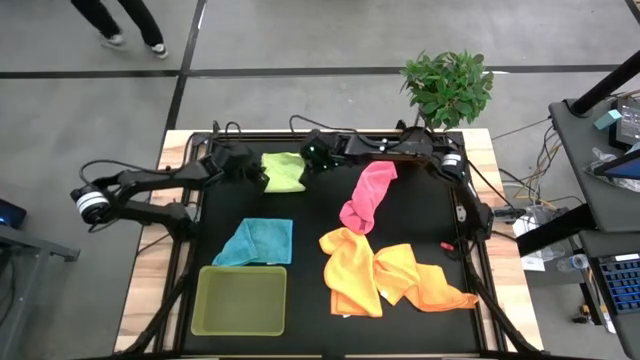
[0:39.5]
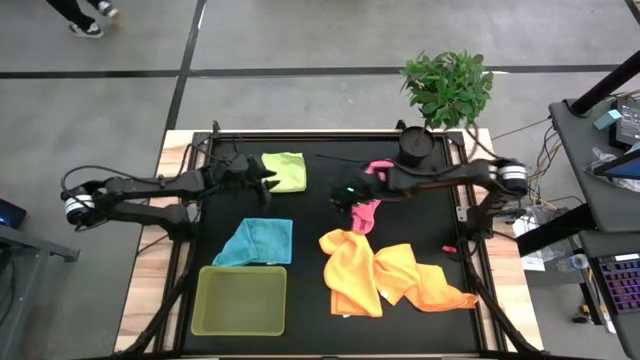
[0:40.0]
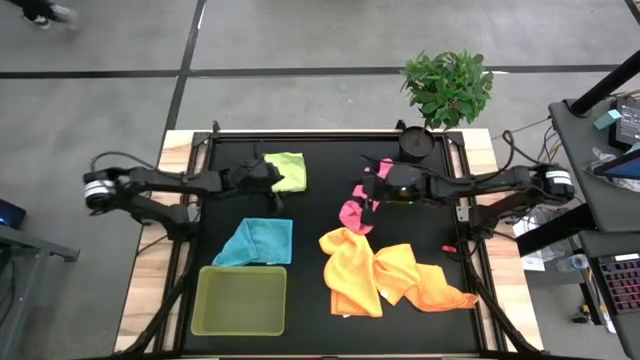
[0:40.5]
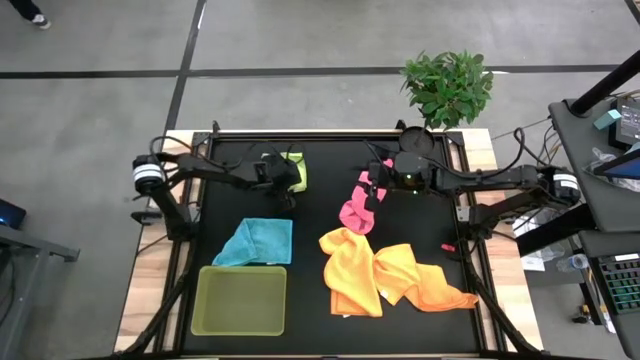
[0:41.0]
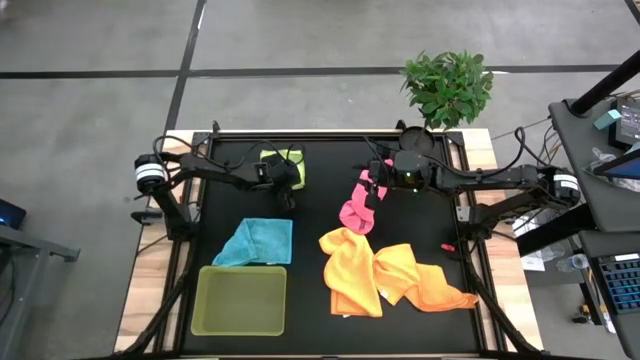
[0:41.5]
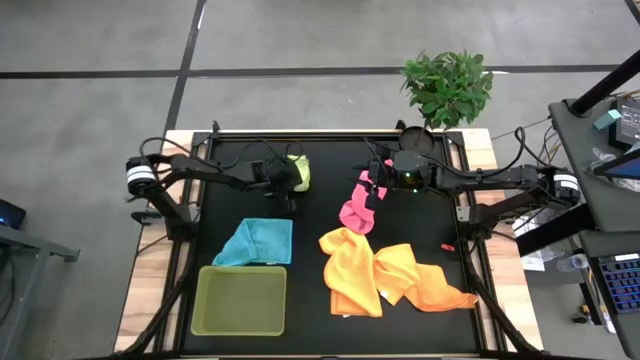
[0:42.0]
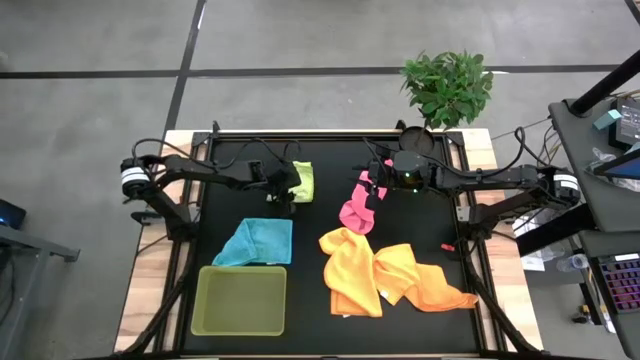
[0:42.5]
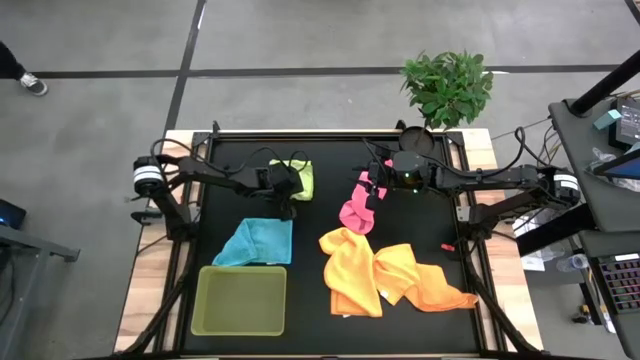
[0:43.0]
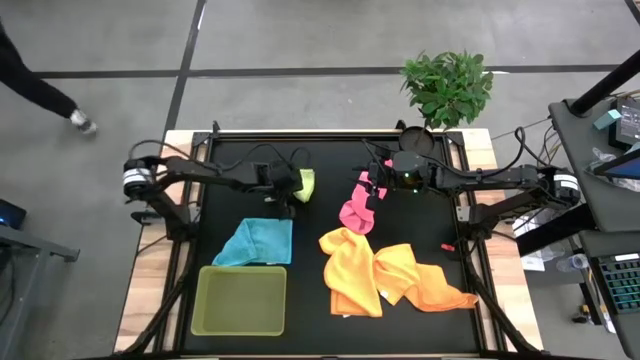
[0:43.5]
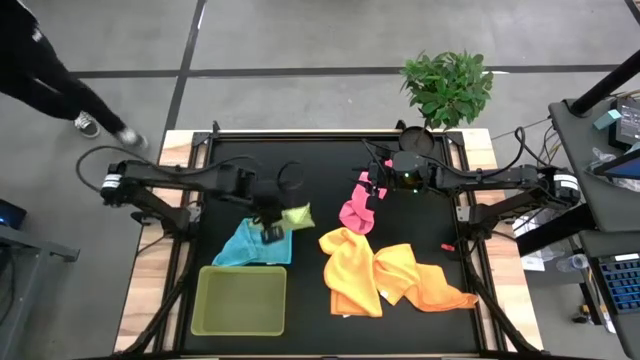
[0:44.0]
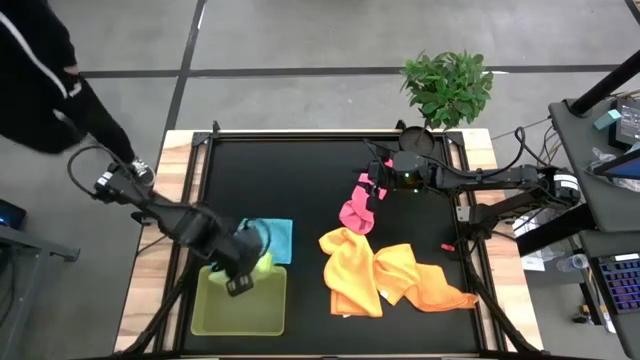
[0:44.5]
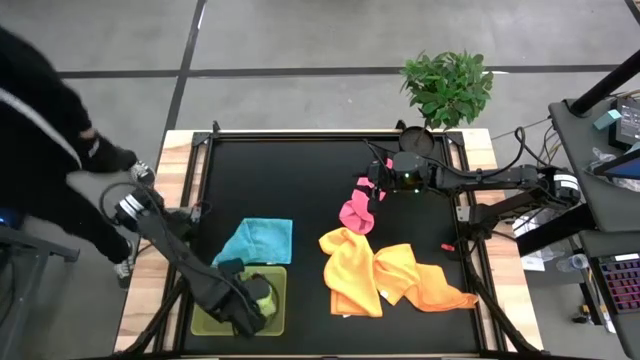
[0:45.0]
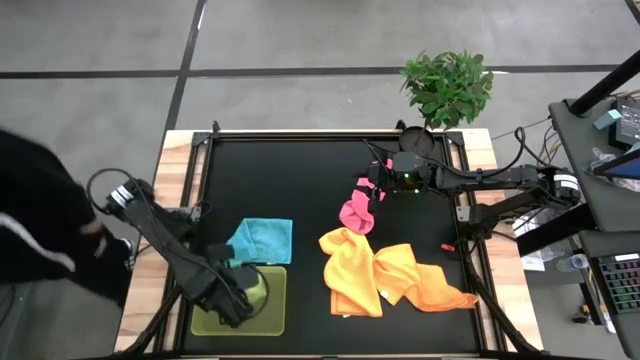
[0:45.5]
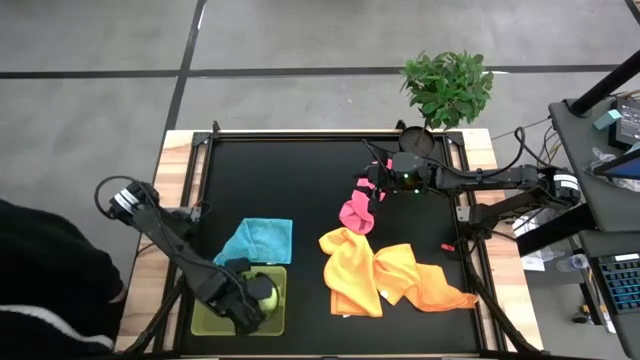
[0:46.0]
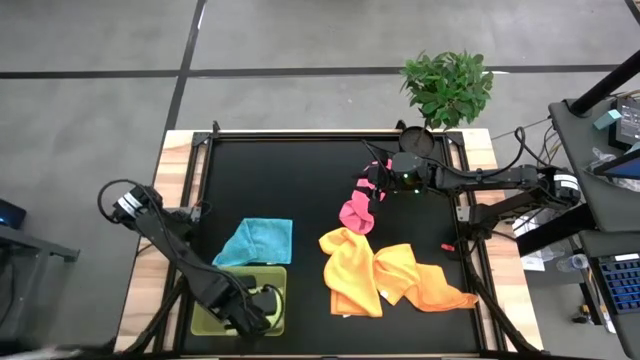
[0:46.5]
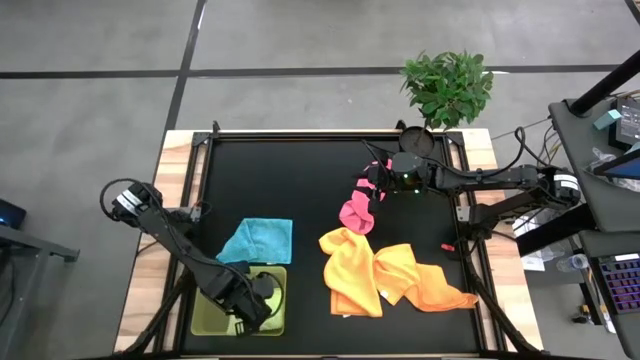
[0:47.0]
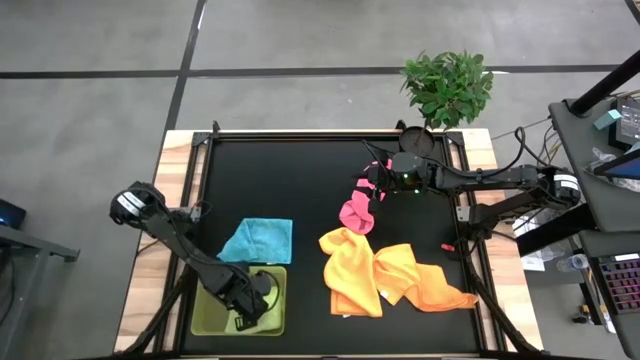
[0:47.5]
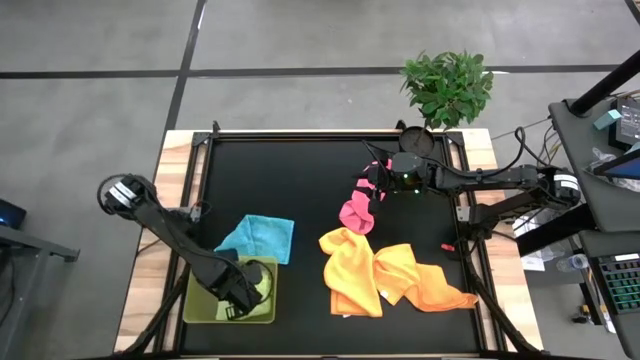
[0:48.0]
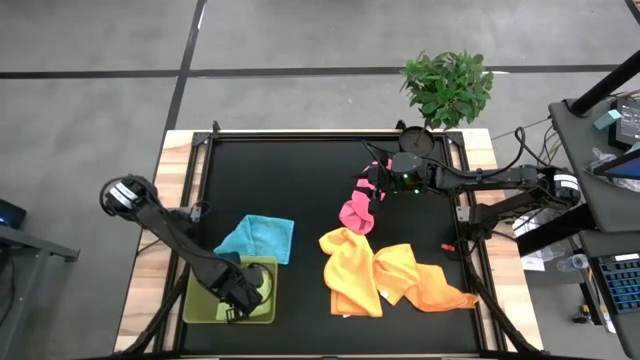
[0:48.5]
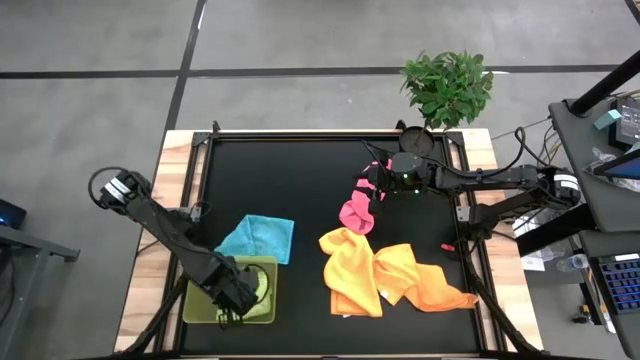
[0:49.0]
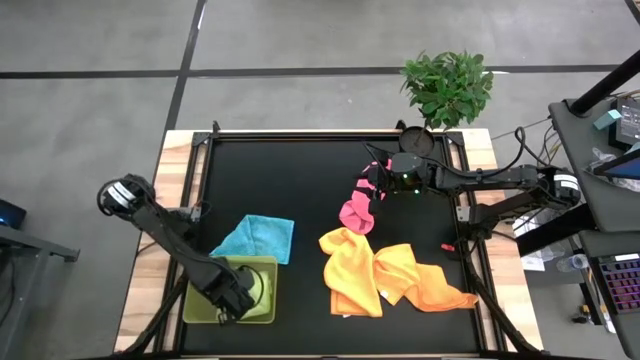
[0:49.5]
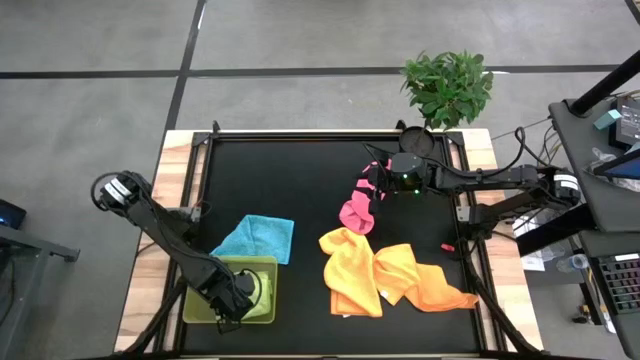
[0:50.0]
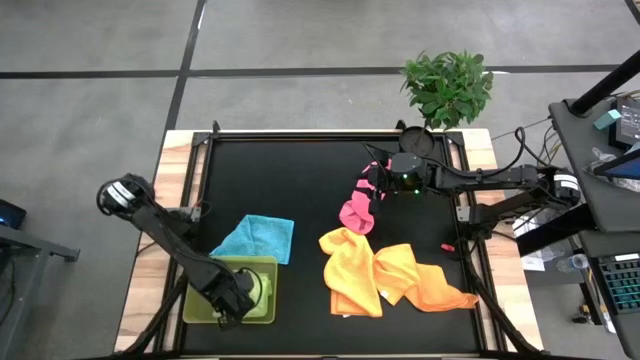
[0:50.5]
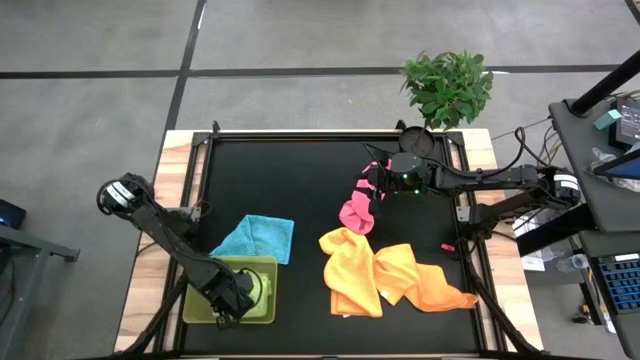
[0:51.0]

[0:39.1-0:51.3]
Task: Fold microfiber towels
Put the folded green microfiber towel into the yellow bin

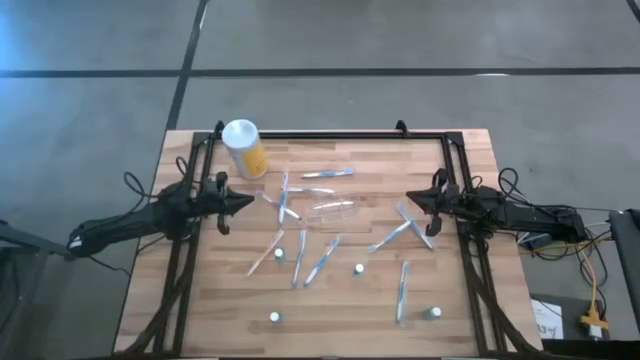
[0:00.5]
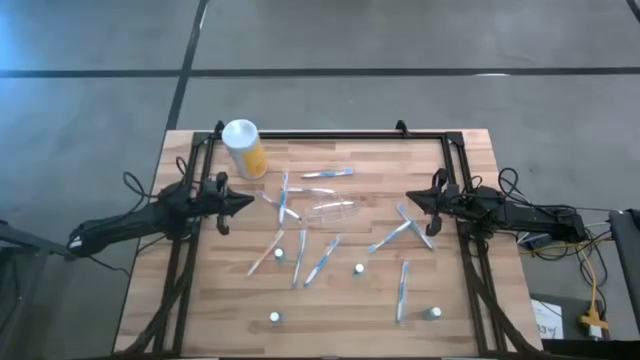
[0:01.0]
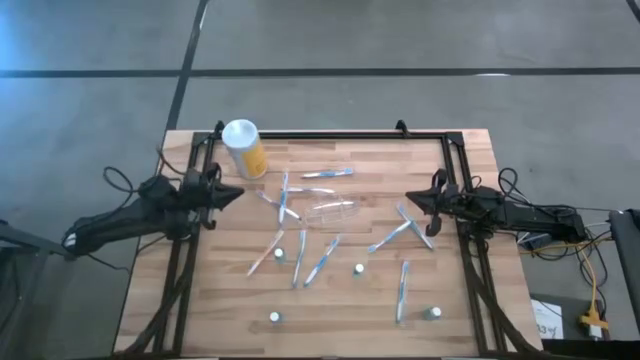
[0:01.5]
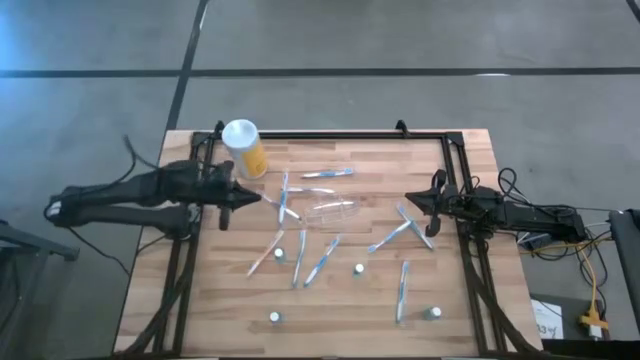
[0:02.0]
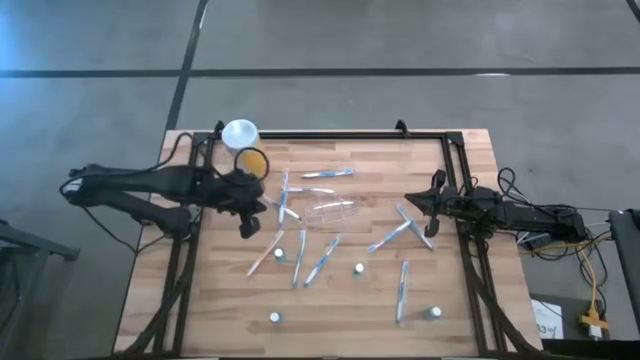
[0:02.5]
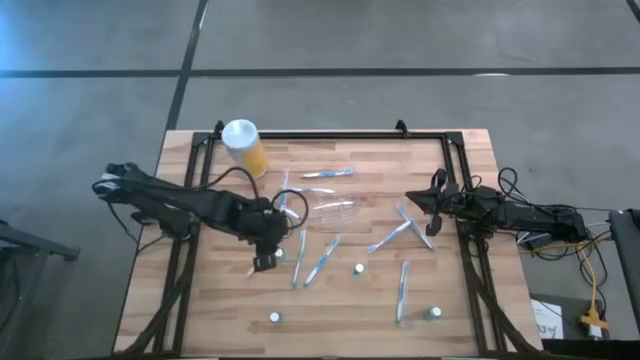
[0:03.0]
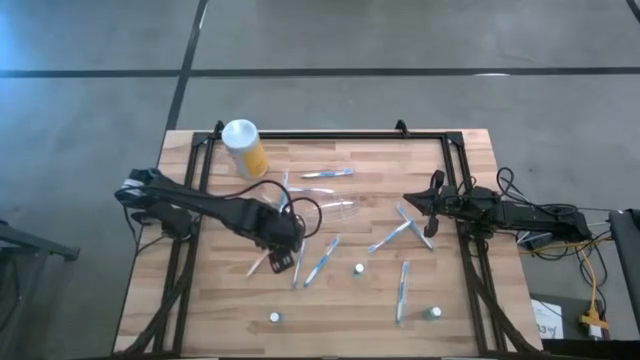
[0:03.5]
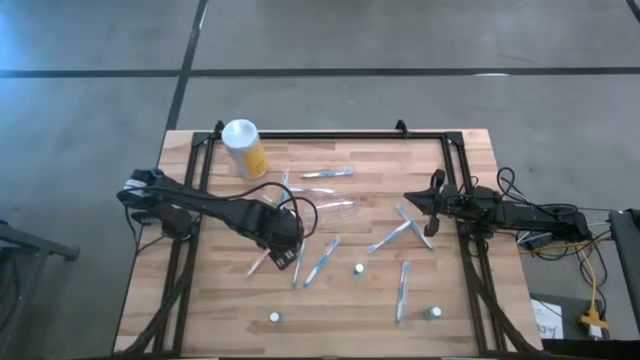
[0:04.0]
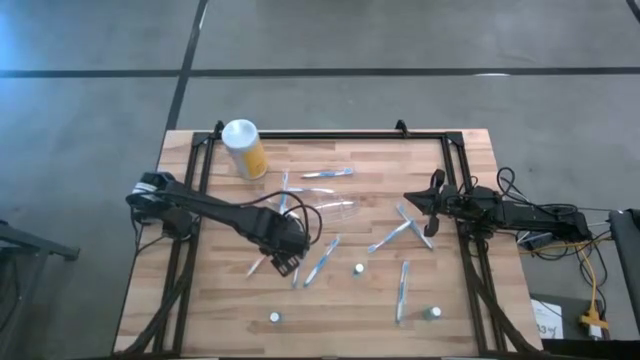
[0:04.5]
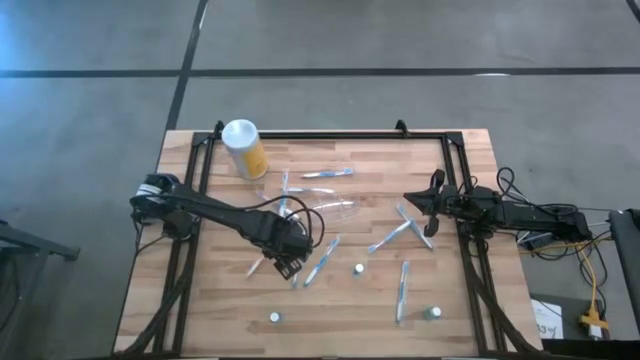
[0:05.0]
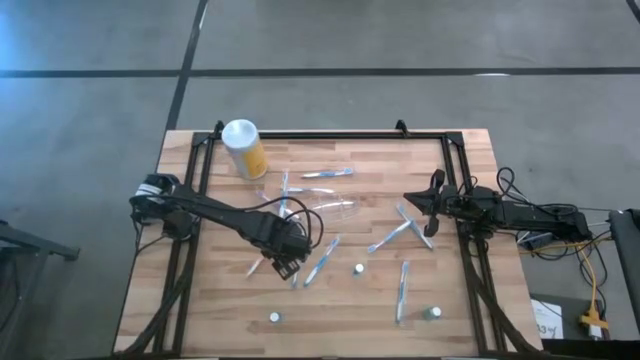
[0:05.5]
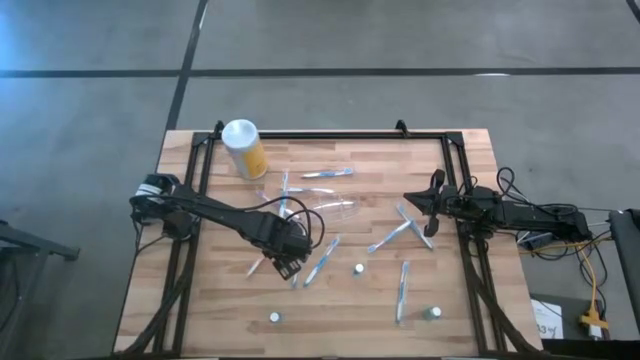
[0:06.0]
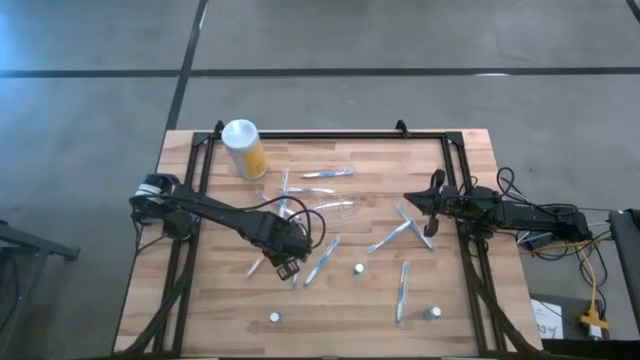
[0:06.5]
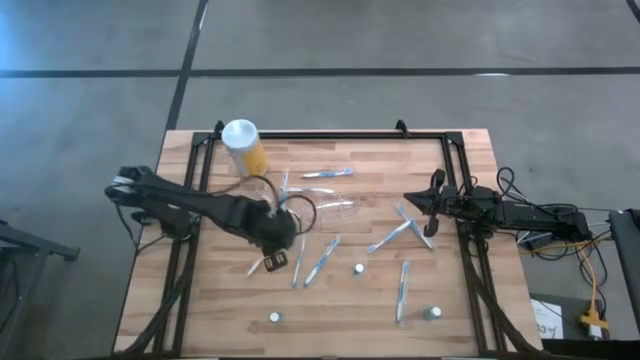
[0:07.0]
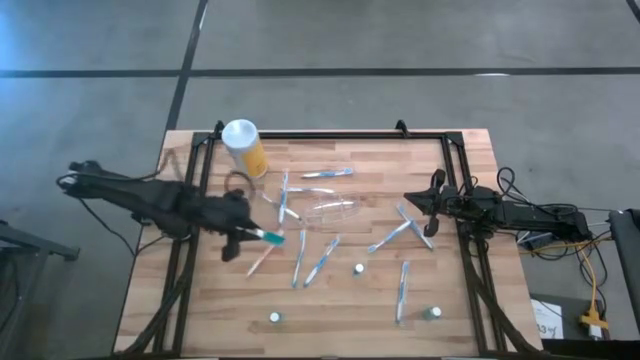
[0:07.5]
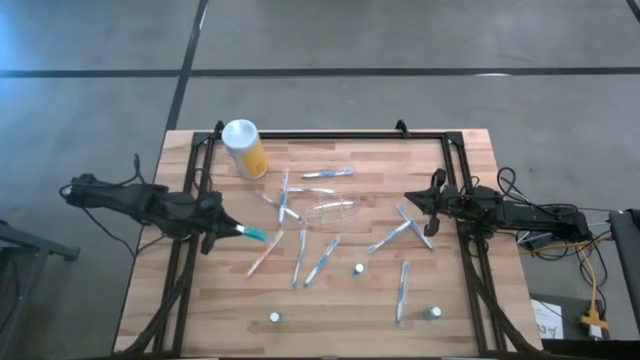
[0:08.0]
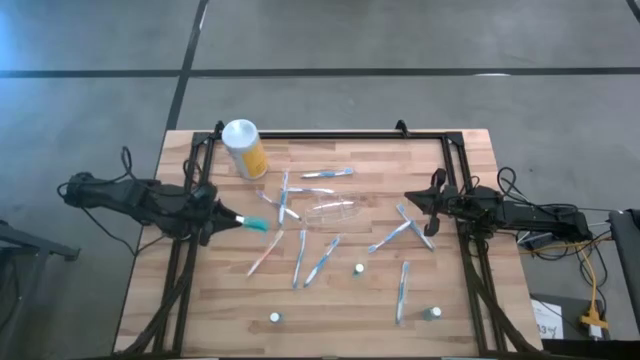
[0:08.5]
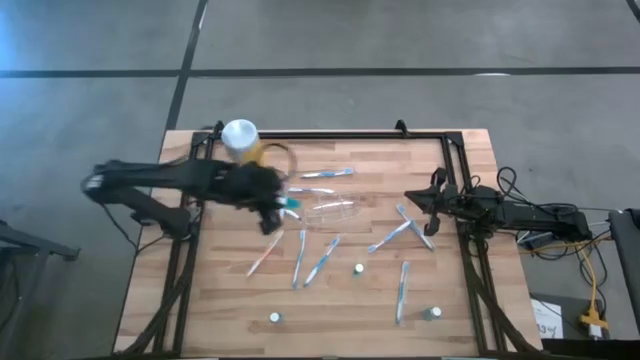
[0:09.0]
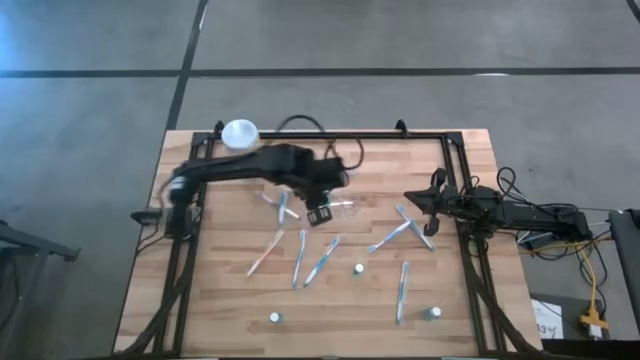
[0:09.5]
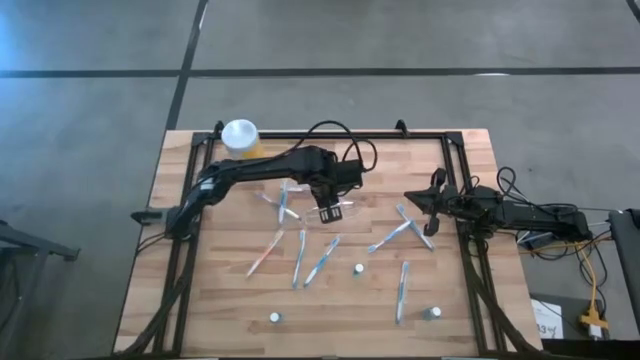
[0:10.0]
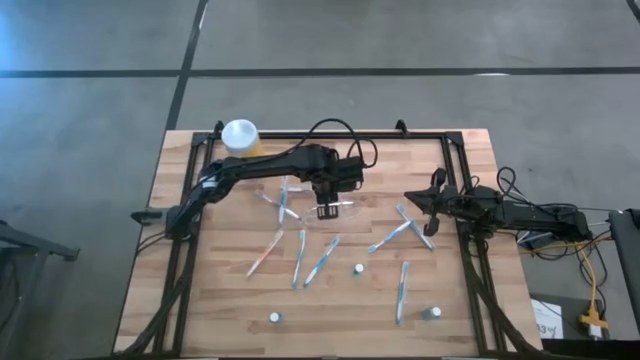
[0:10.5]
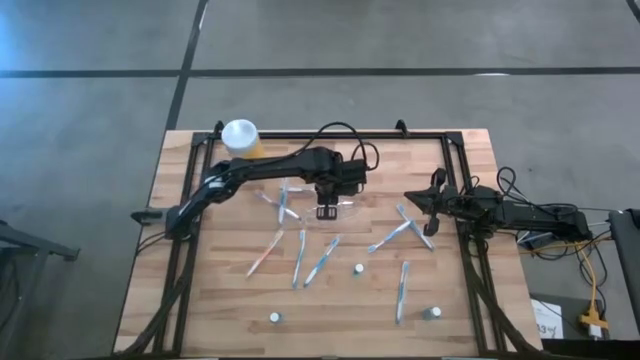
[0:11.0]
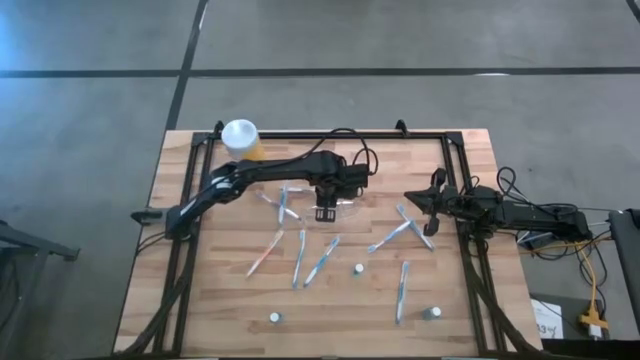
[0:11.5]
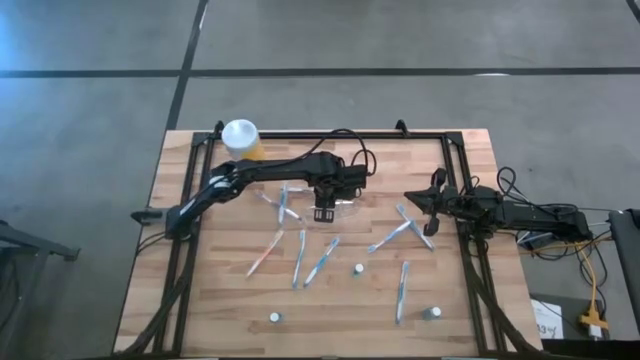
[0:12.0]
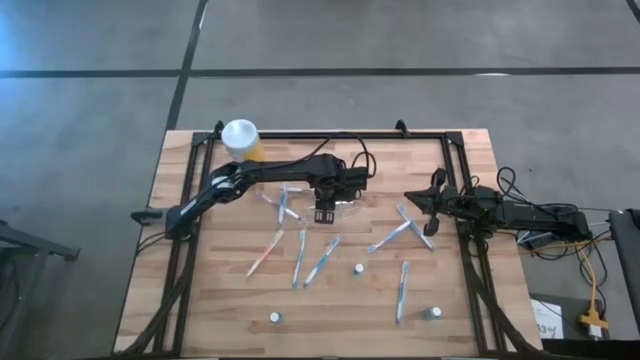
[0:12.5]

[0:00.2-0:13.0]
Task: Pick & Place toothbrushing station
Put the mouthwash into the middle section of the transparent organizer
